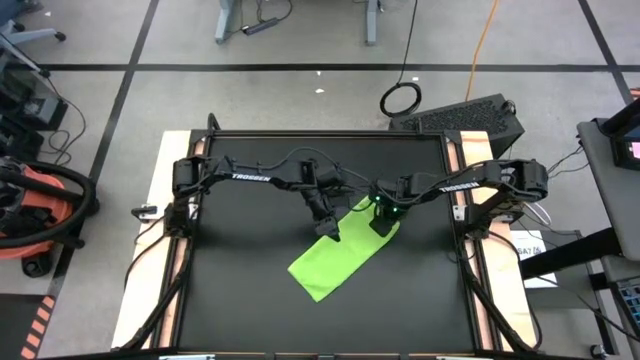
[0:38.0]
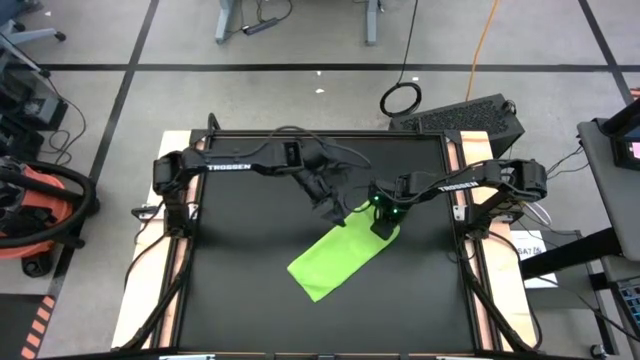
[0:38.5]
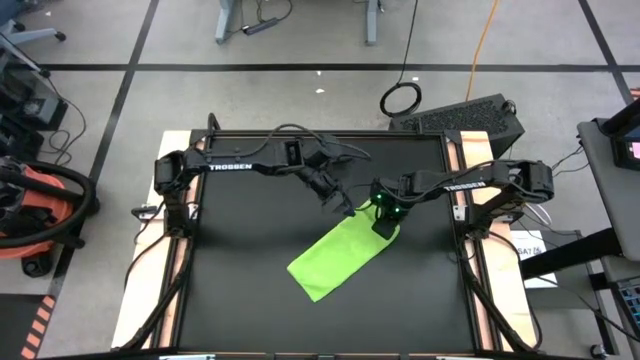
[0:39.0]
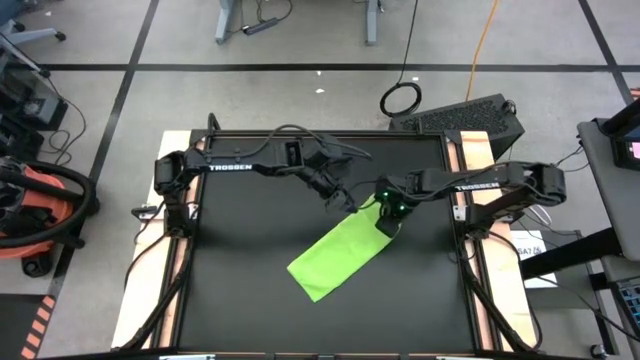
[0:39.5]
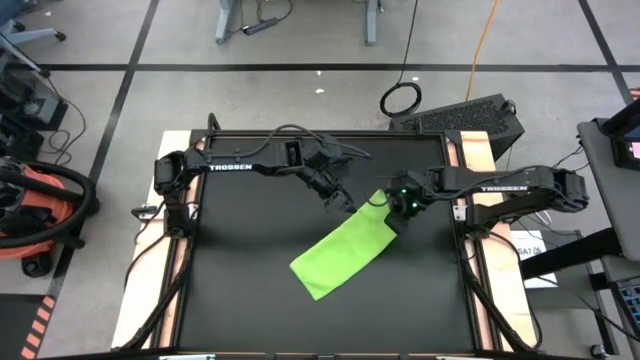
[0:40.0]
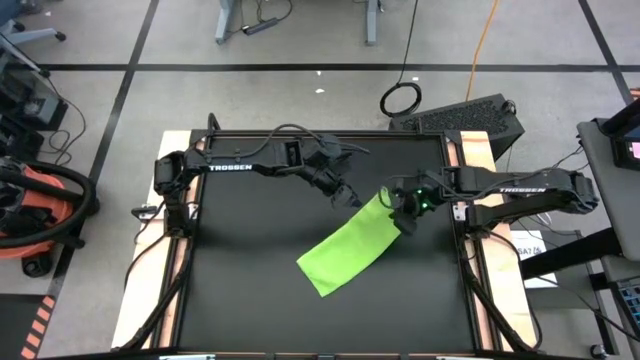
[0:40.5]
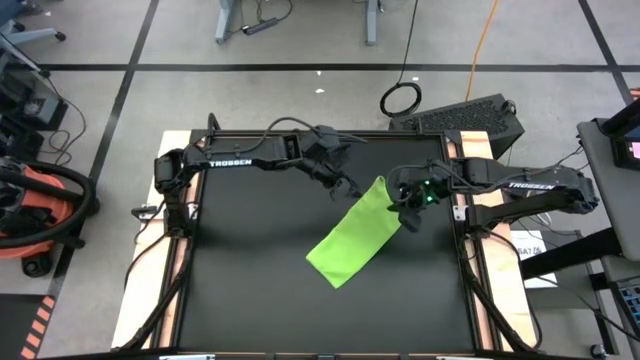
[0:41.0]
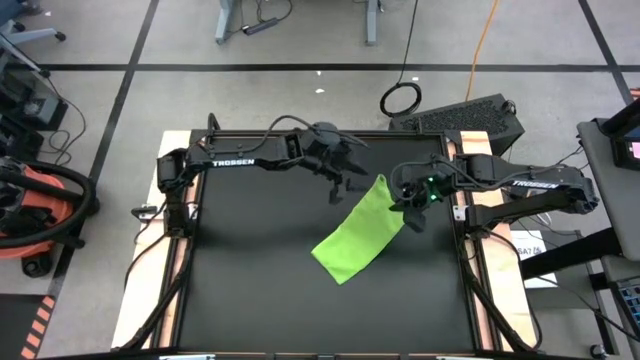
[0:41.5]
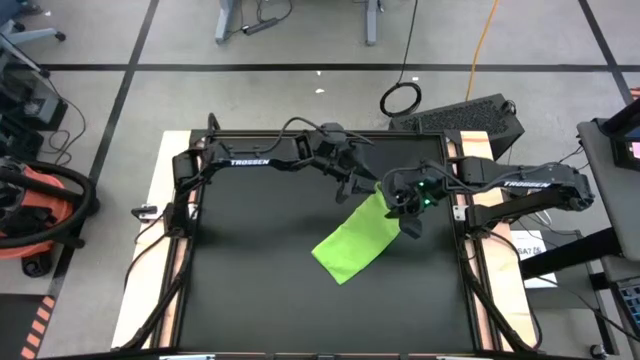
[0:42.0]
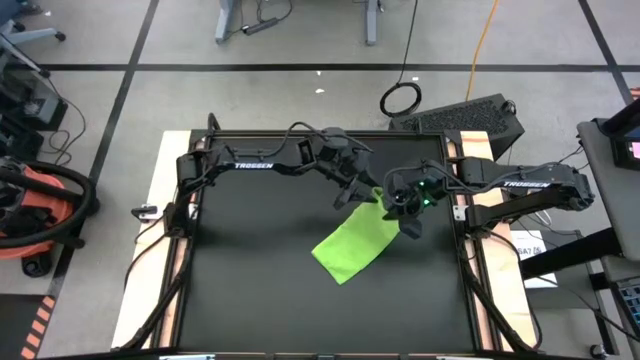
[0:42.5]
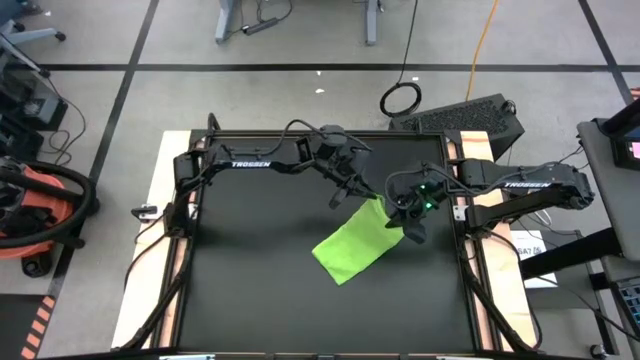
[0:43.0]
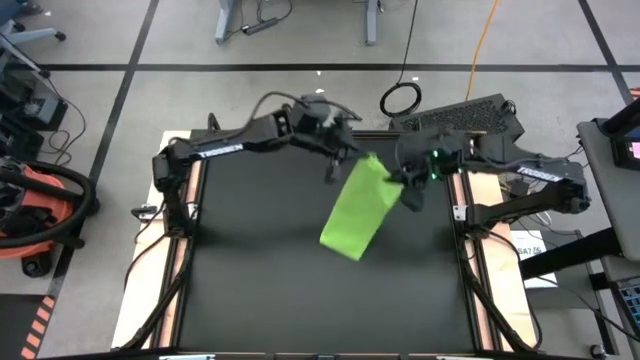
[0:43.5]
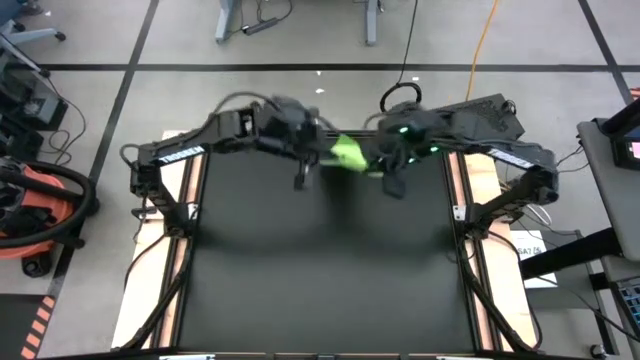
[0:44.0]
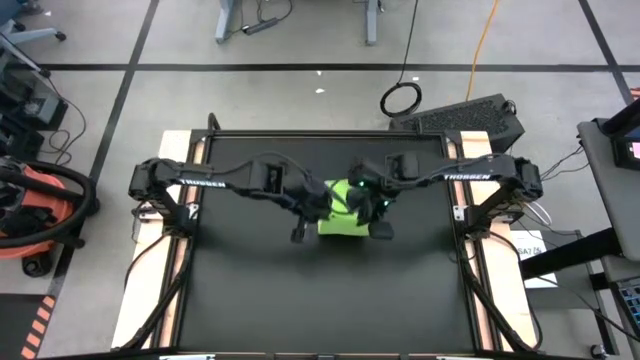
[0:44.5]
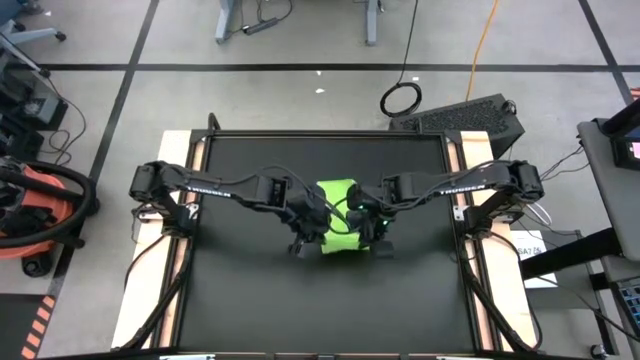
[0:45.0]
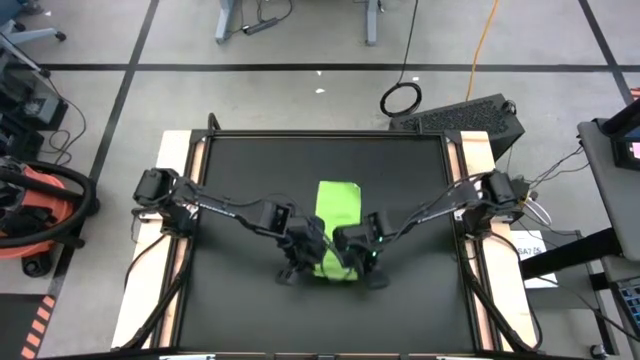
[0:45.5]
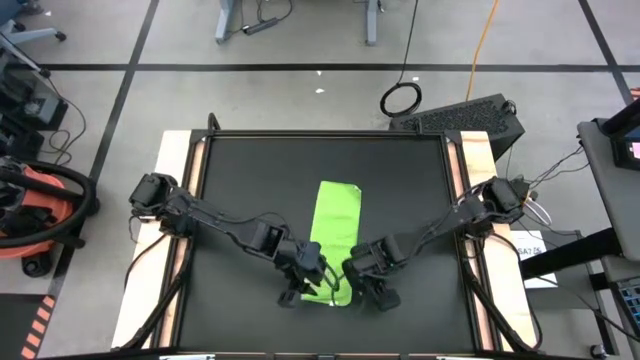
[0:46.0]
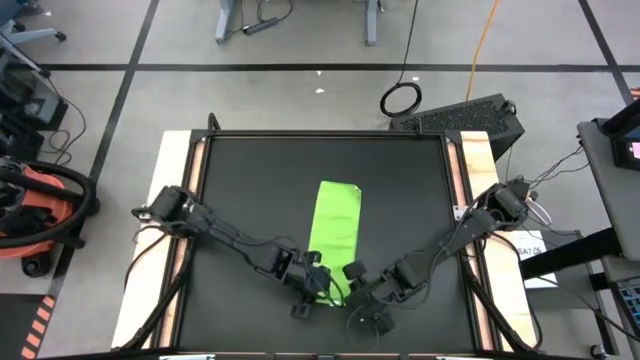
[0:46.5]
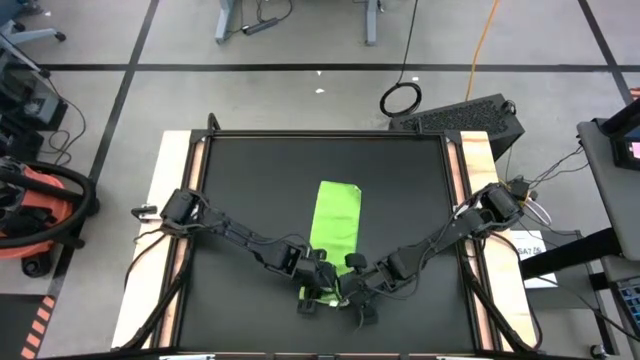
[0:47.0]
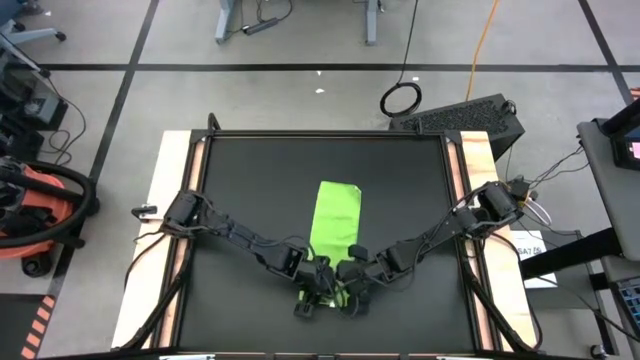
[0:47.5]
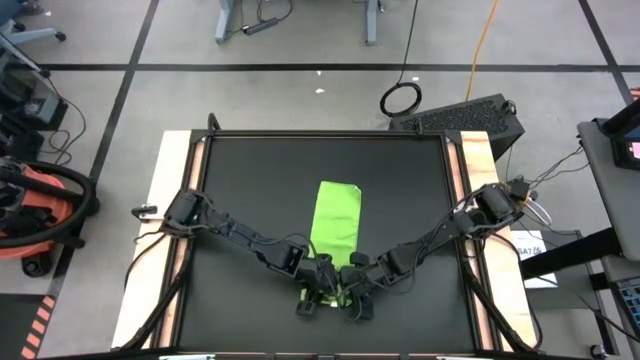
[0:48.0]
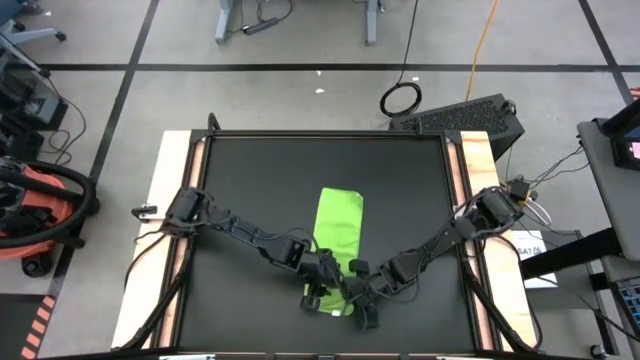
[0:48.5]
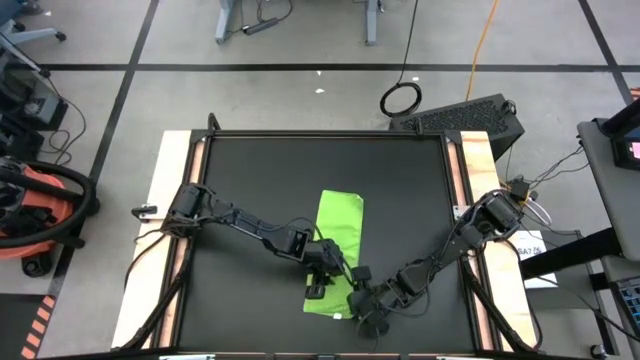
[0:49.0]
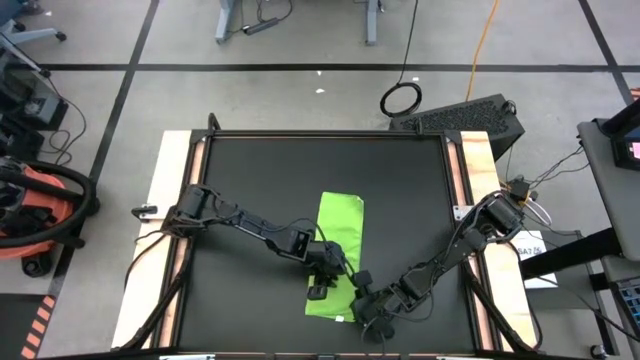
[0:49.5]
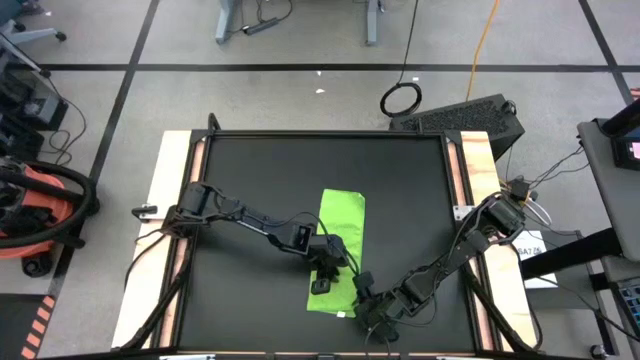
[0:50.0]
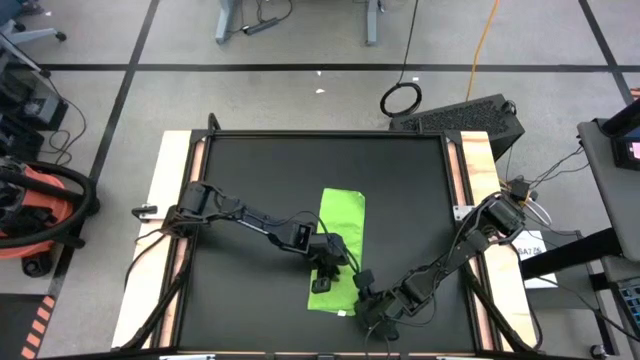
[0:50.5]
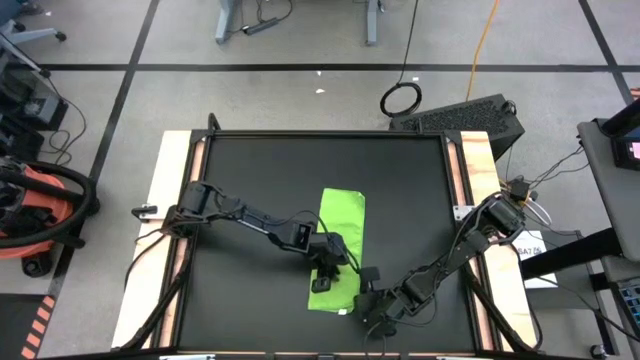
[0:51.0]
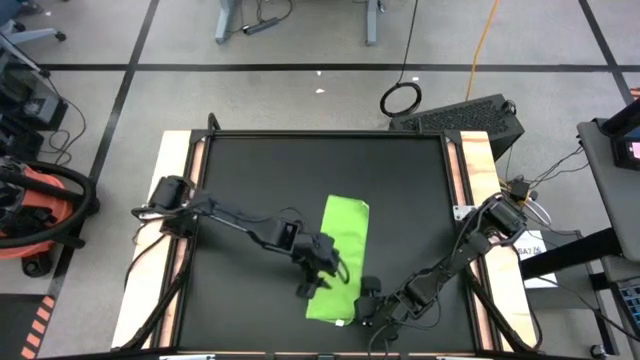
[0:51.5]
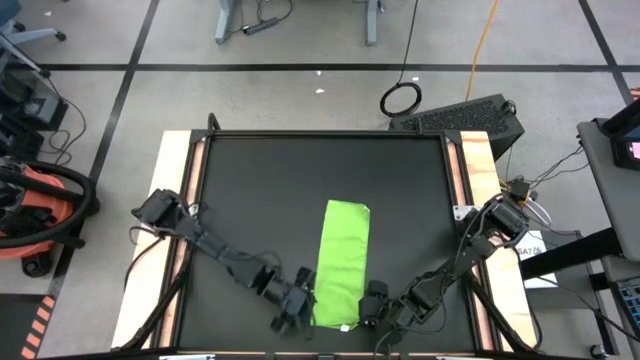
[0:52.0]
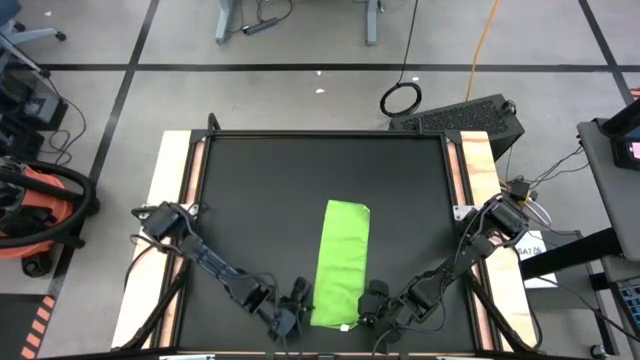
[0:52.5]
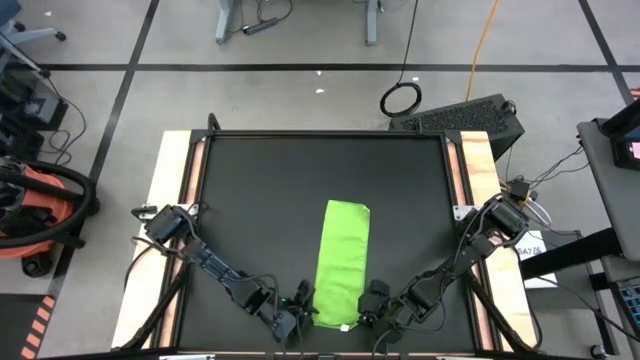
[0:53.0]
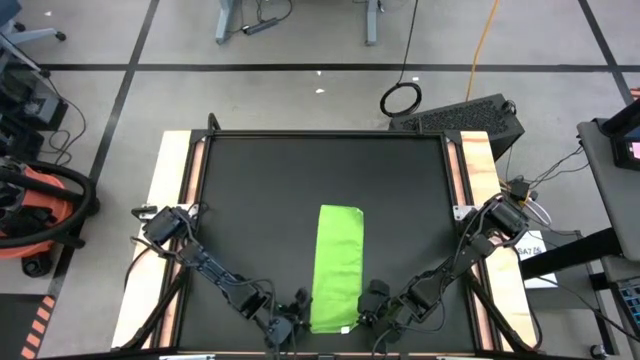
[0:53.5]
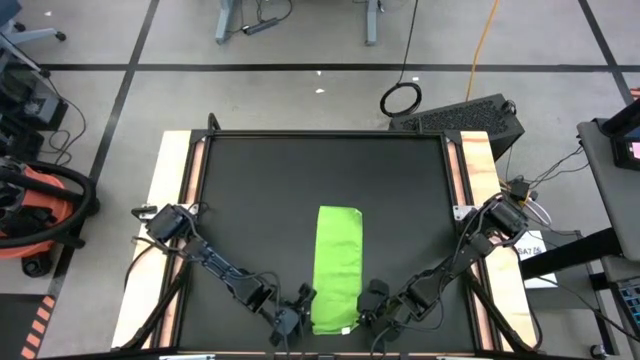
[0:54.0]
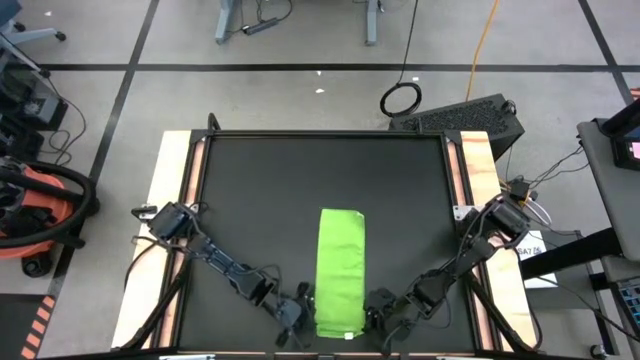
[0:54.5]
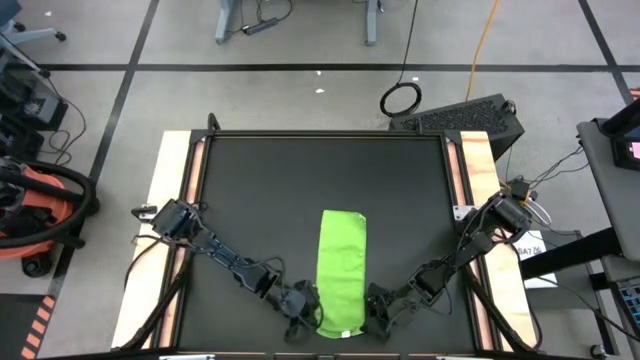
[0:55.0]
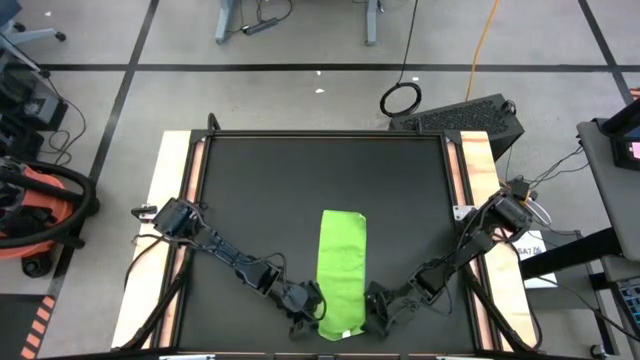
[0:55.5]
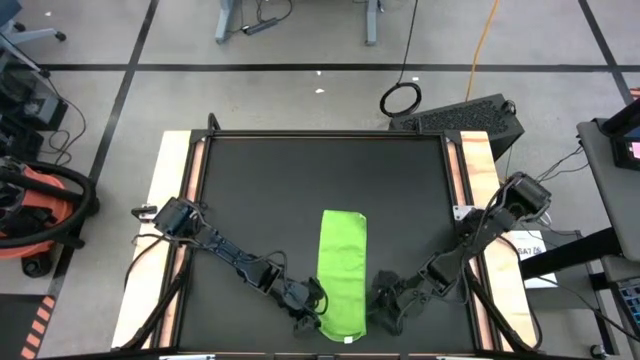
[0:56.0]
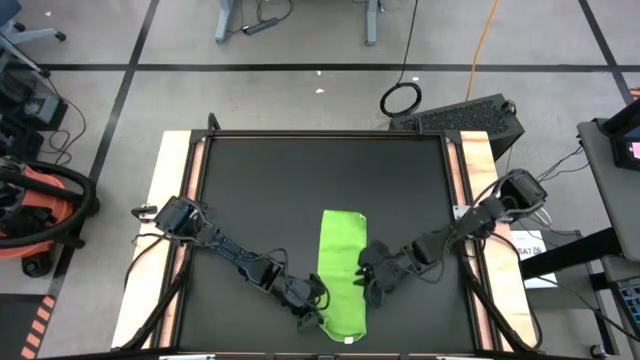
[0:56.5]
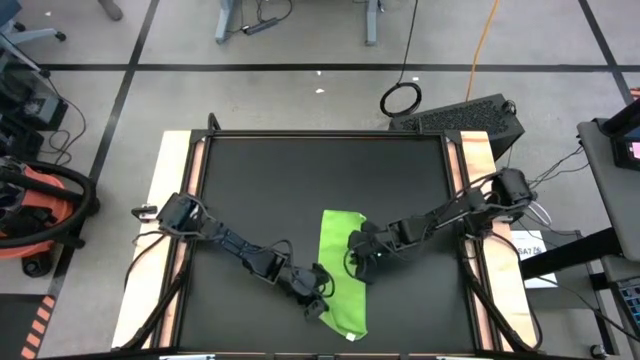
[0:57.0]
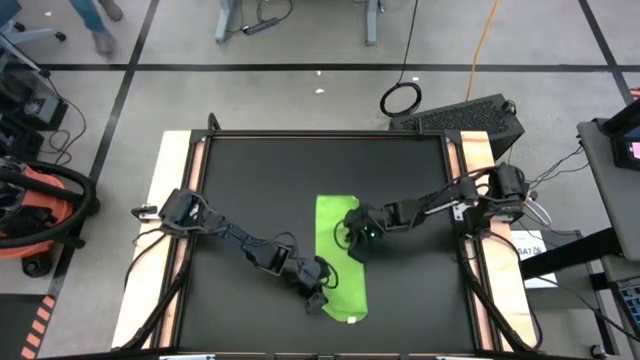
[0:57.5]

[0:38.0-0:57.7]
Task: Roll towel
Roll the green microfiber towel

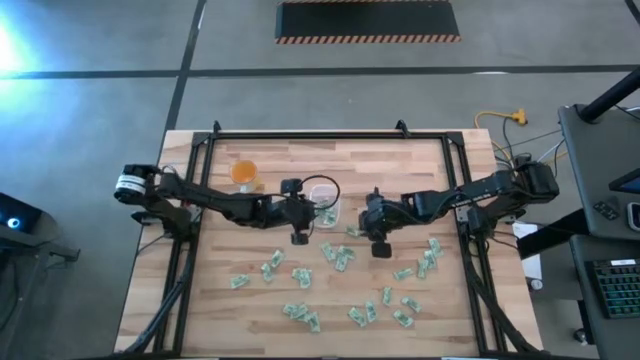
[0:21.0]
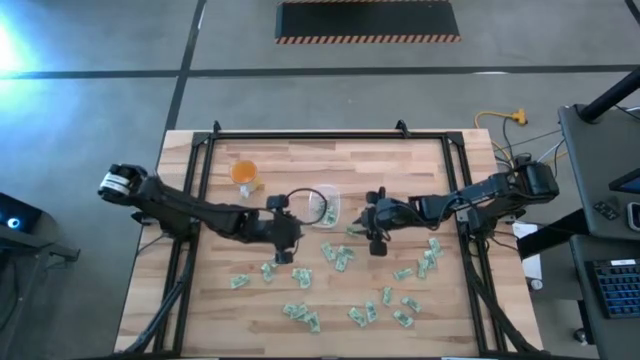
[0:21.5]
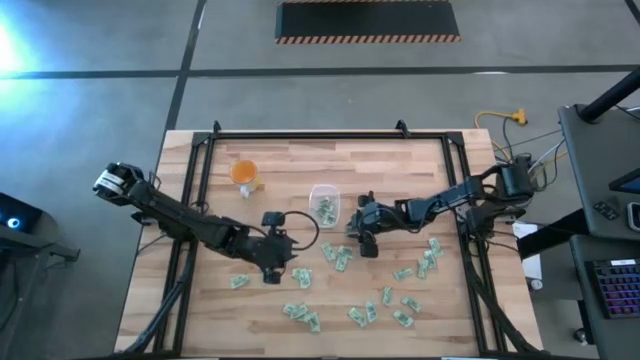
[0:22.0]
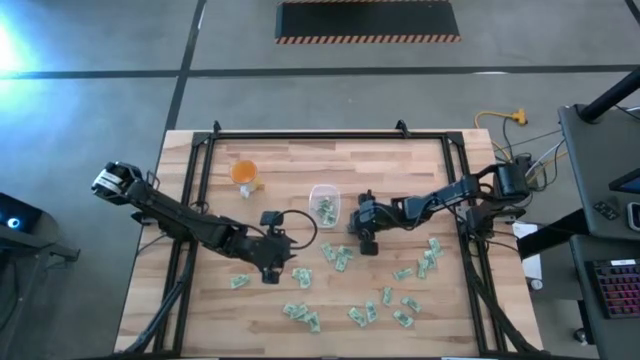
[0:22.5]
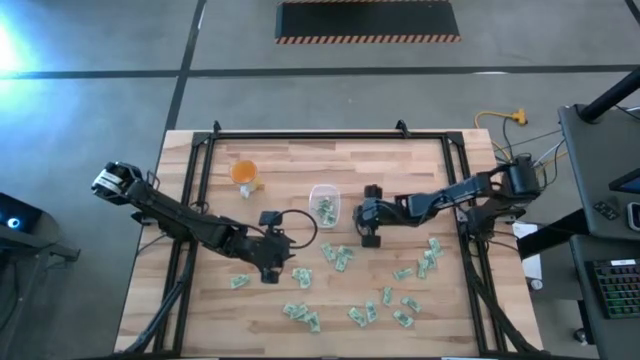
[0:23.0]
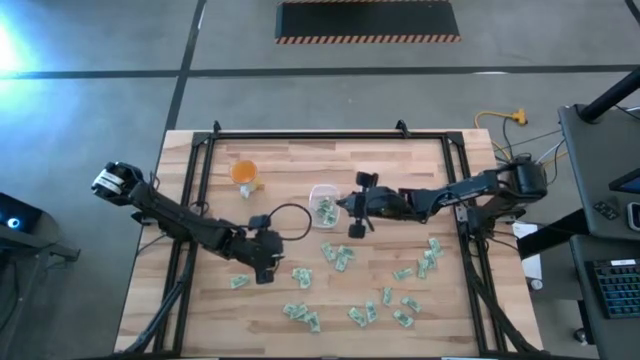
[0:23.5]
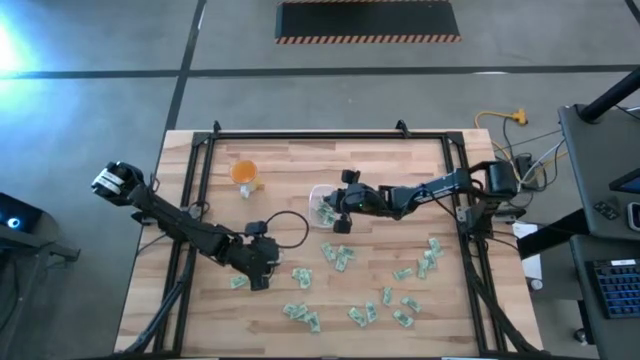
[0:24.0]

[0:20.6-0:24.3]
Task: Pick and place Stevia / Truvia into bins
Put the stevia packet into the bin
